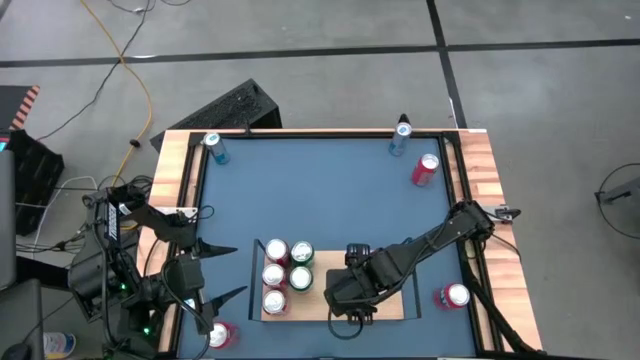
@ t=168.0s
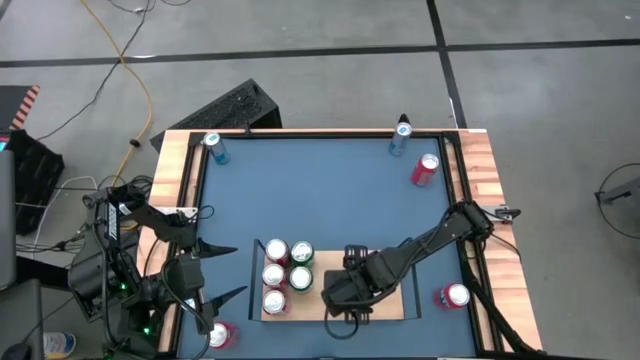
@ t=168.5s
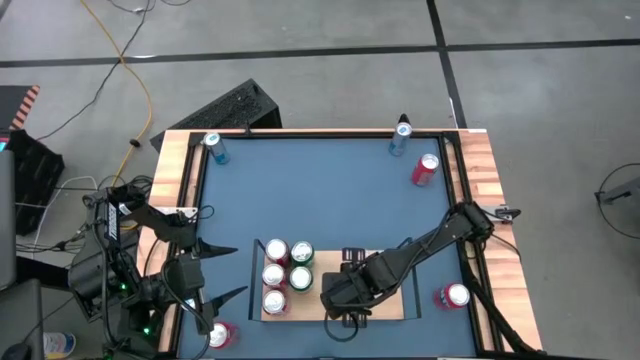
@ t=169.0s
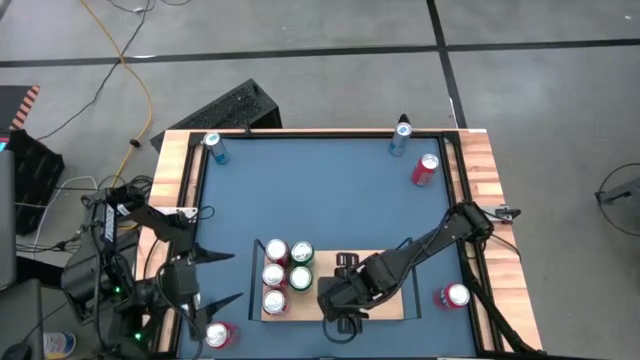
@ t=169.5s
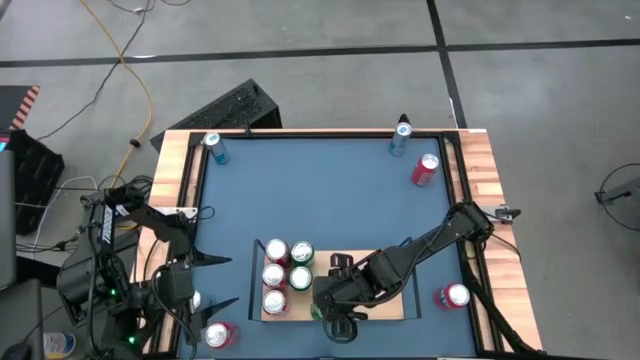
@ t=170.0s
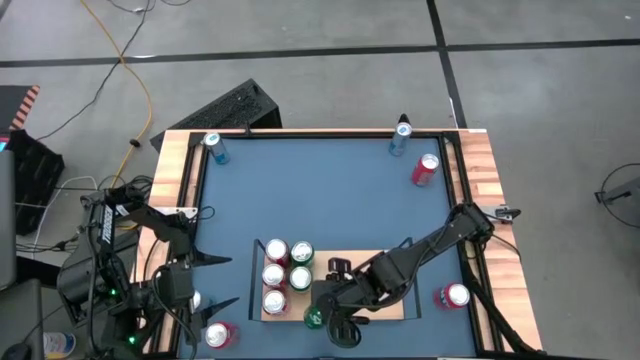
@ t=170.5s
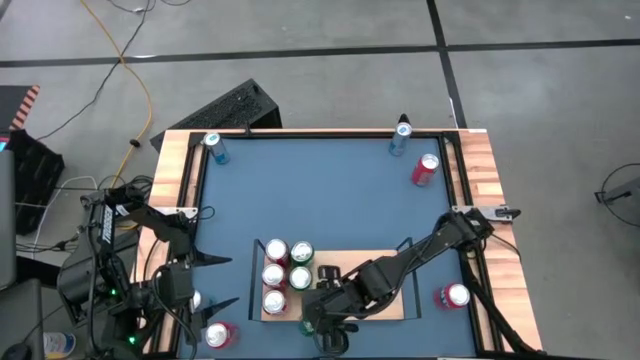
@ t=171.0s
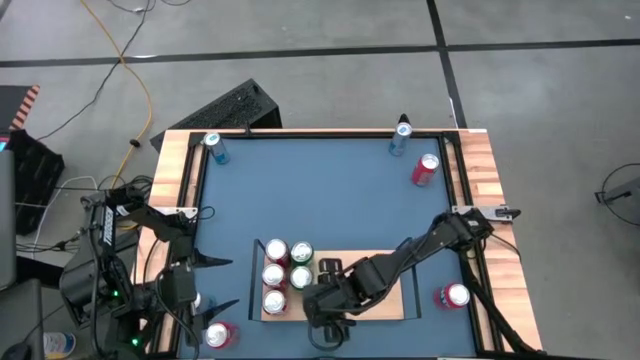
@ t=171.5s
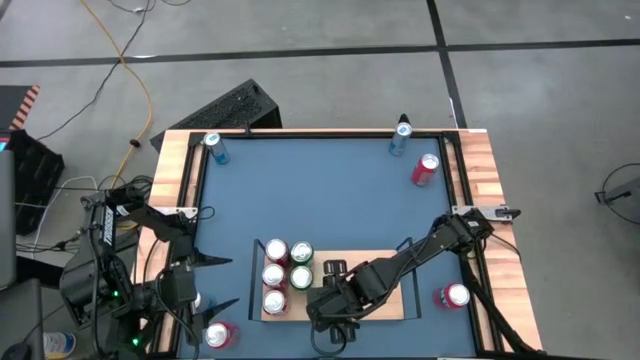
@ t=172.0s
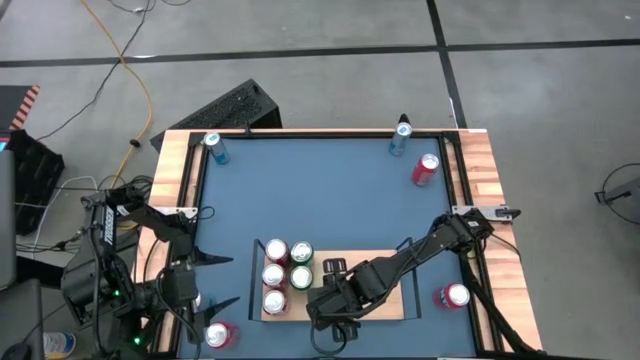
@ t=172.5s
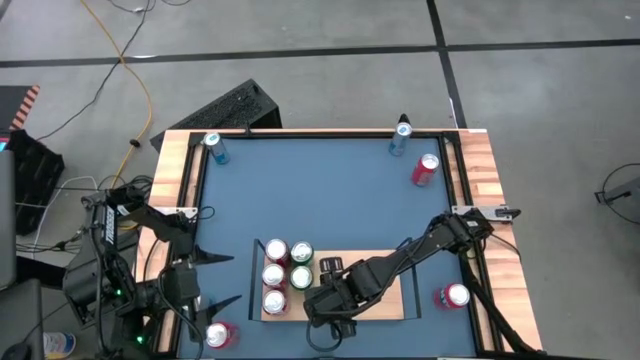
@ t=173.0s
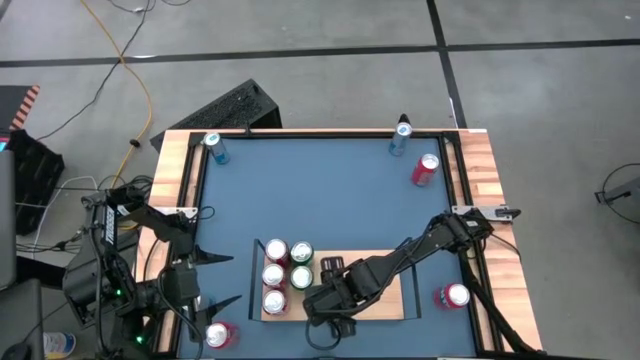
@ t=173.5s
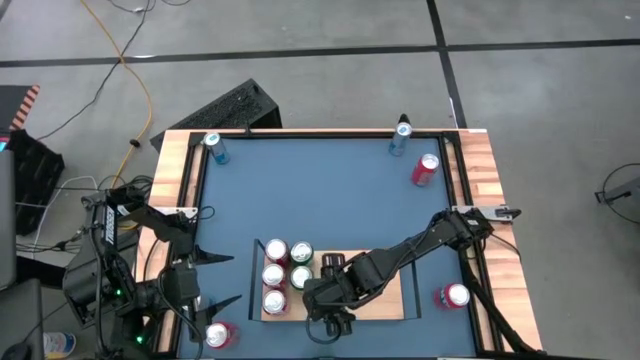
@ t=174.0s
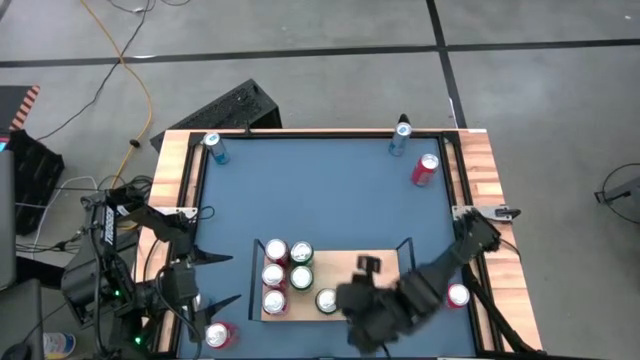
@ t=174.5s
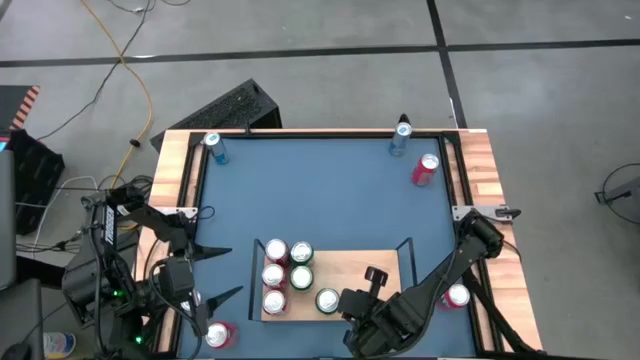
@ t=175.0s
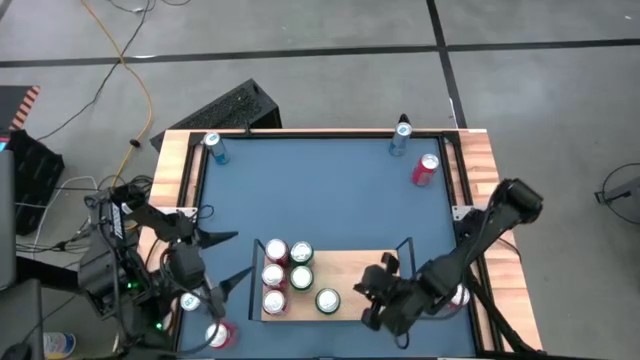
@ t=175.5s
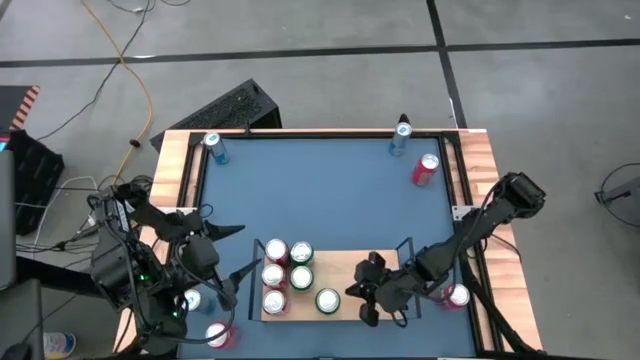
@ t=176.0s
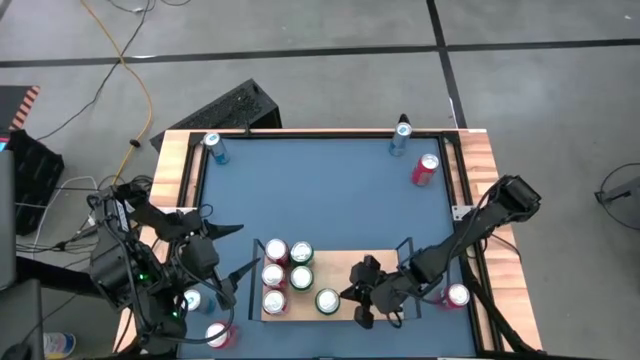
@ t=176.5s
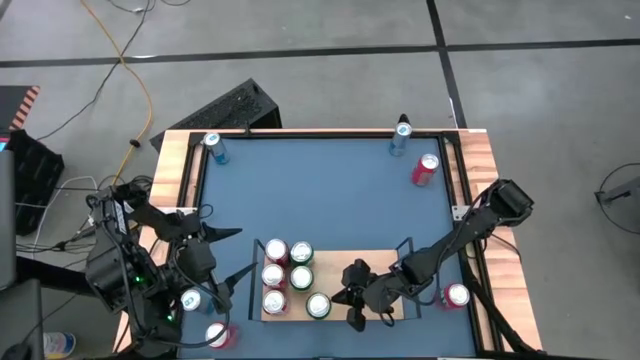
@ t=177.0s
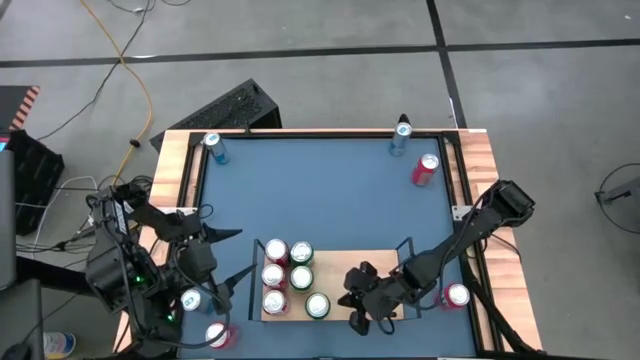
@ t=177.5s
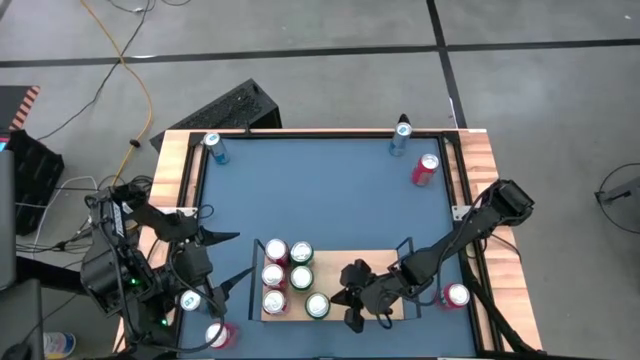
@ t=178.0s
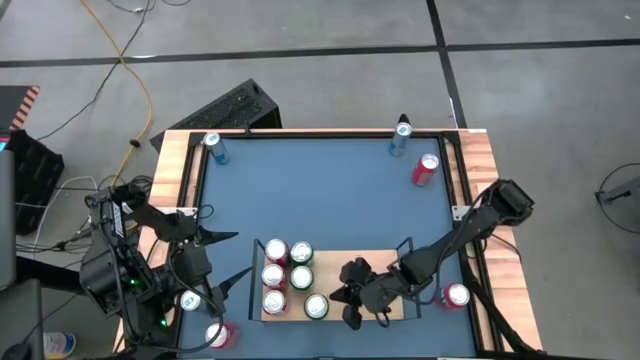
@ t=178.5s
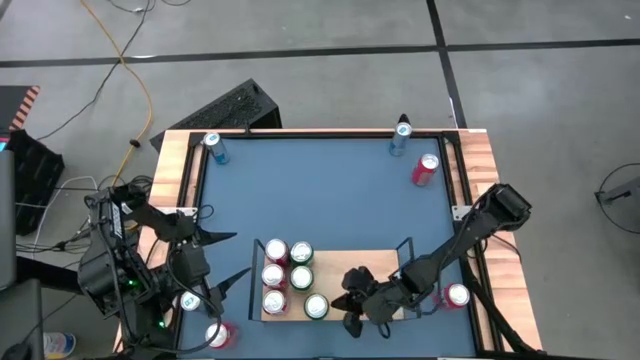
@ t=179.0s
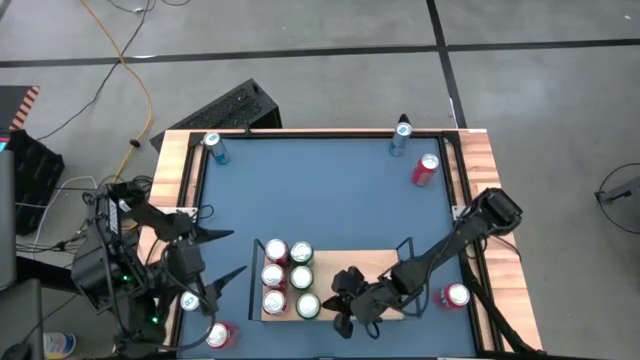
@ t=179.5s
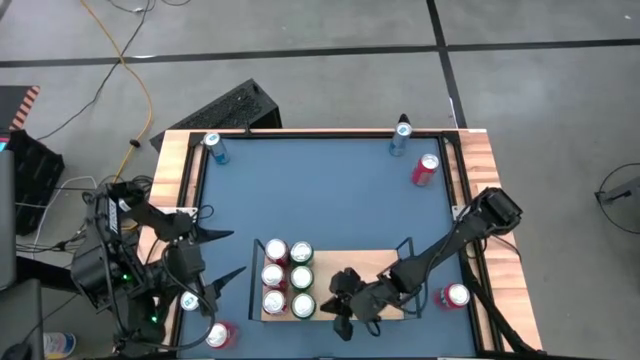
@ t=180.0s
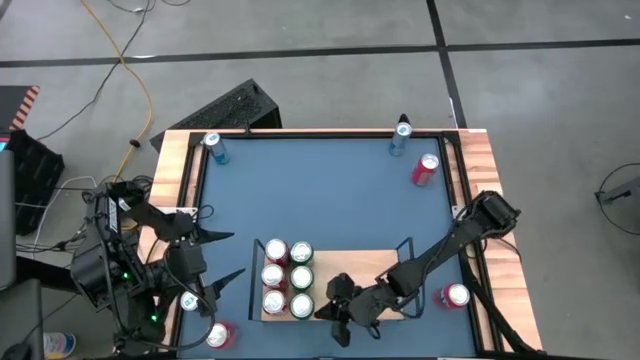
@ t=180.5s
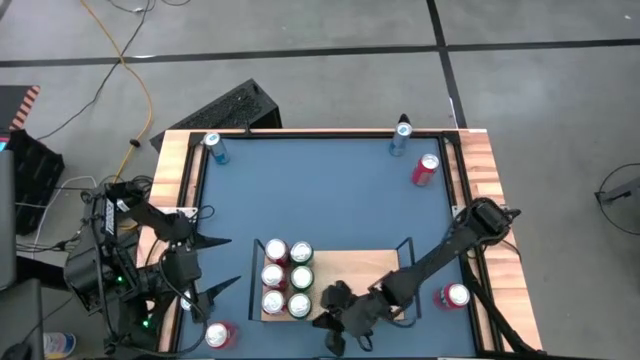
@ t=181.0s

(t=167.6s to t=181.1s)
Task: Place canned beverage on shelf
Put the green soda can on the shelf aligned with the other green soda can

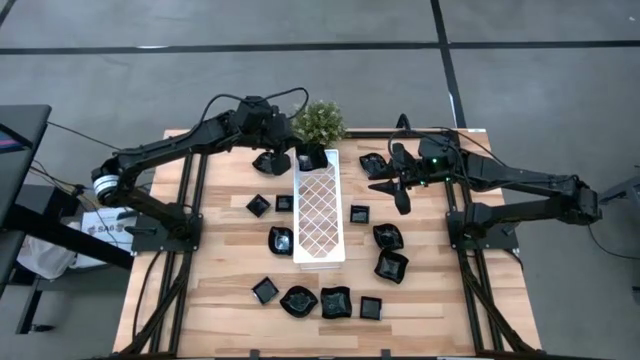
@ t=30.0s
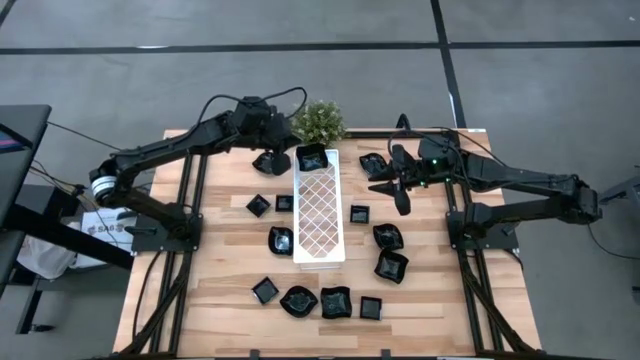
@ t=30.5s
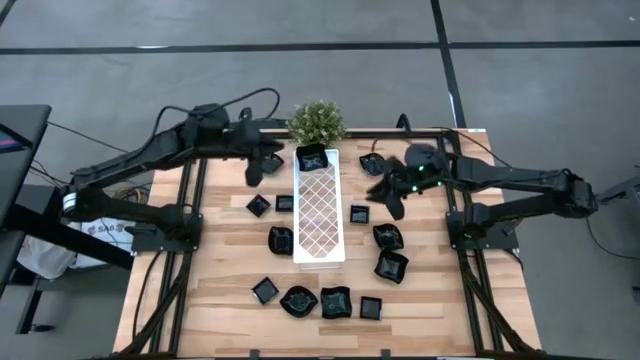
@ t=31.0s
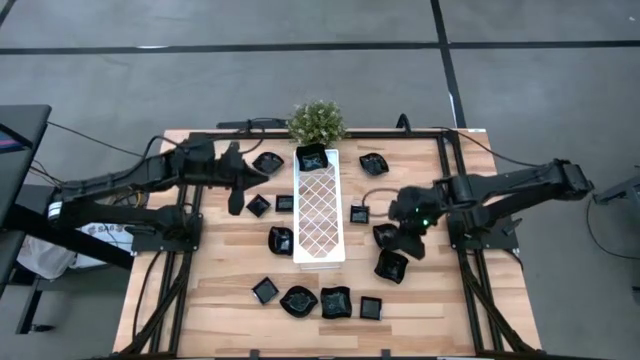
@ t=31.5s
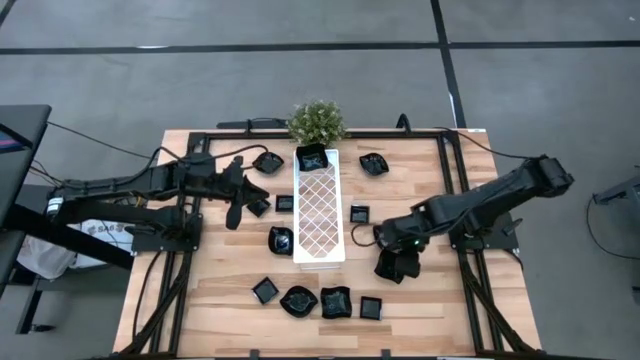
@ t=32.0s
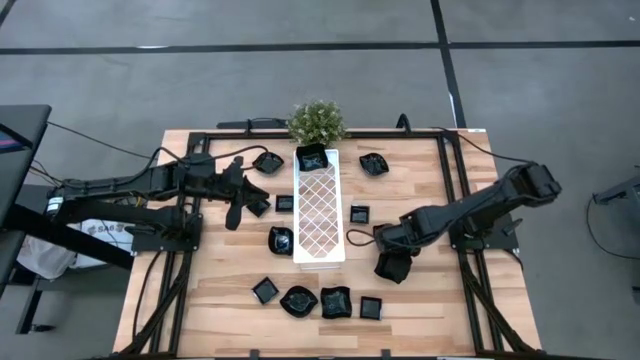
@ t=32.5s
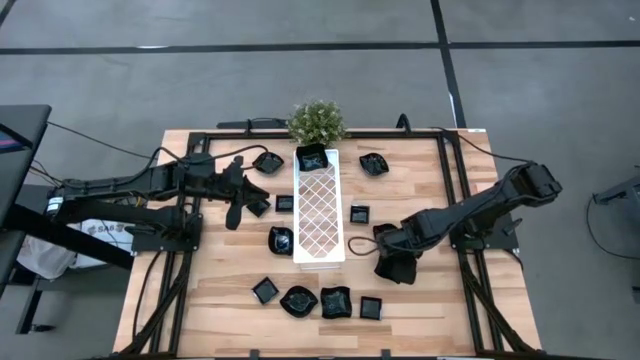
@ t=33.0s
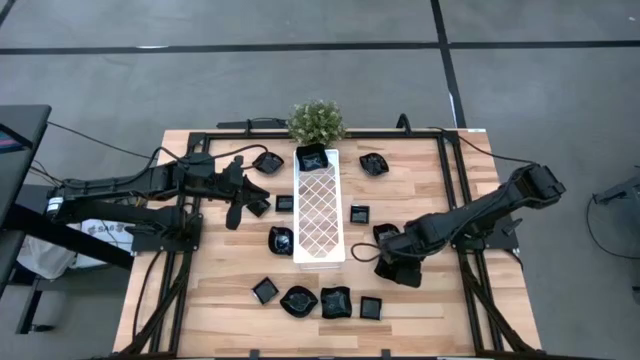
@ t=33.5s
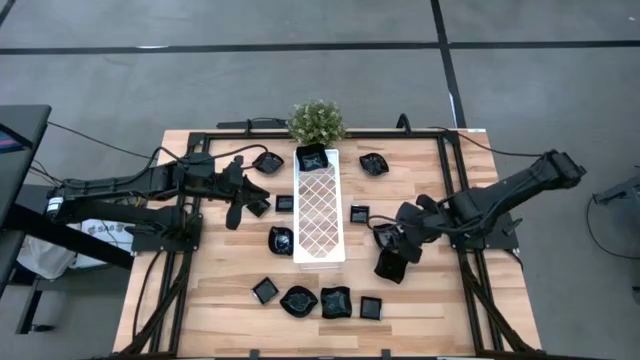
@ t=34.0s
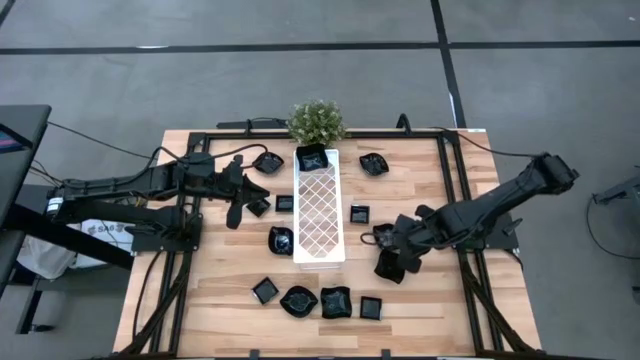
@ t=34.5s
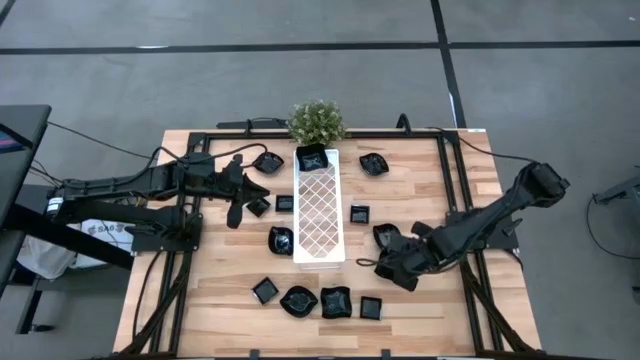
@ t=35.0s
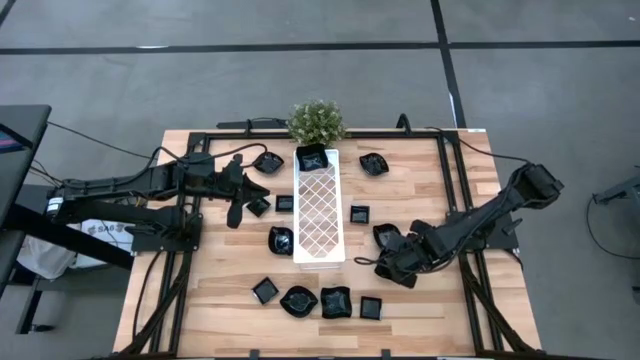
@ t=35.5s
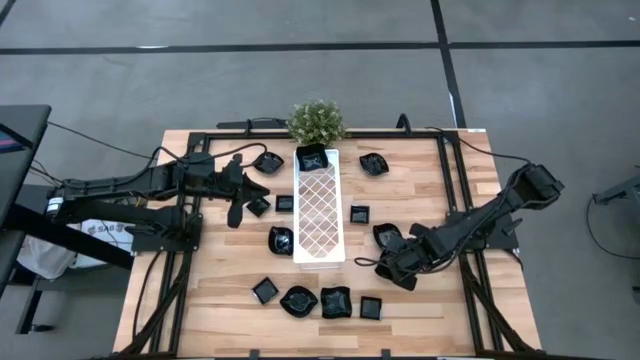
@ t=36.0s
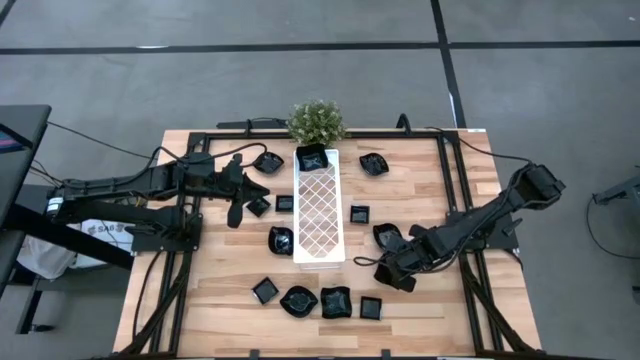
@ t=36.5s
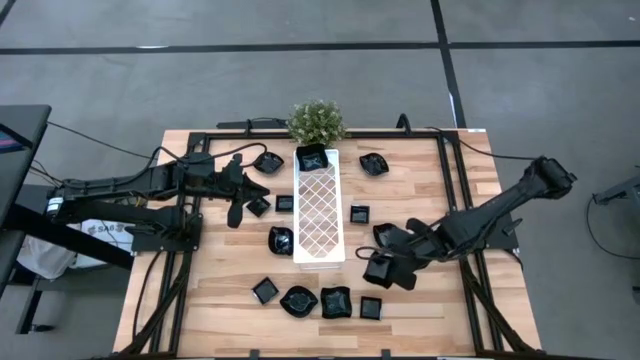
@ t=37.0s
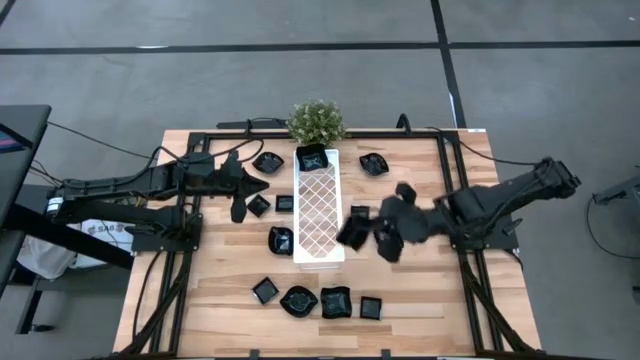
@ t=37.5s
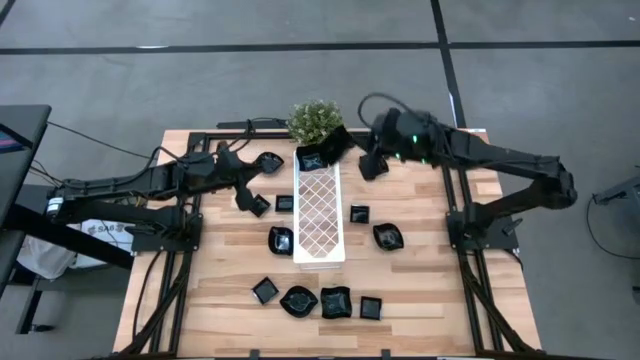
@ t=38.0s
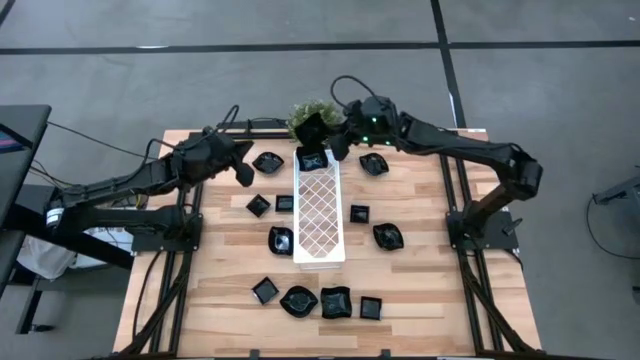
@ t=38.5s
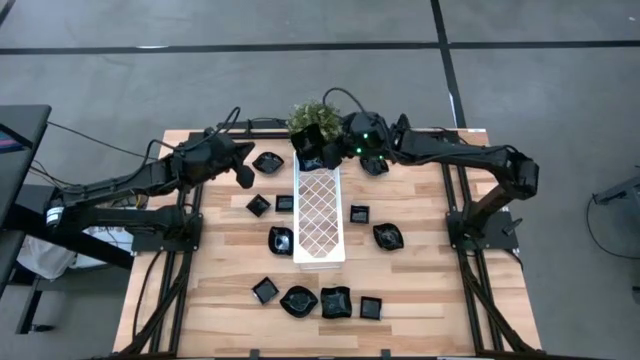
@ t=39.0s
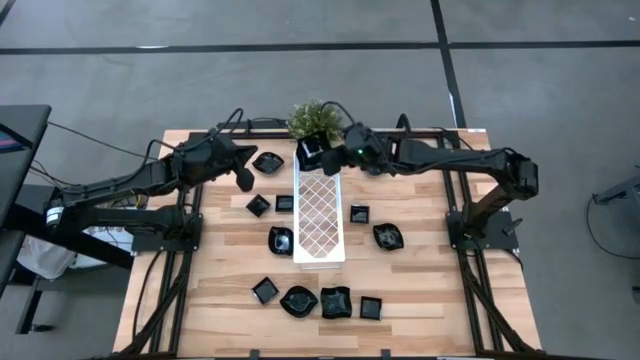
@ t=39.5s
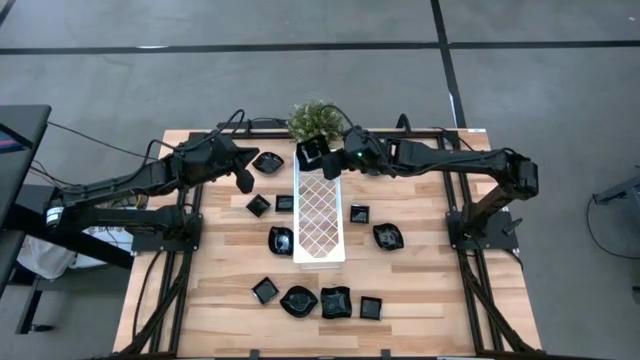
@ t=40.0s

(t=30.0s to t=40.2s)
Task: Pick & Place Mini shaped plates
Stack the top distorted square plate on the other distorted square plate on the shelf
